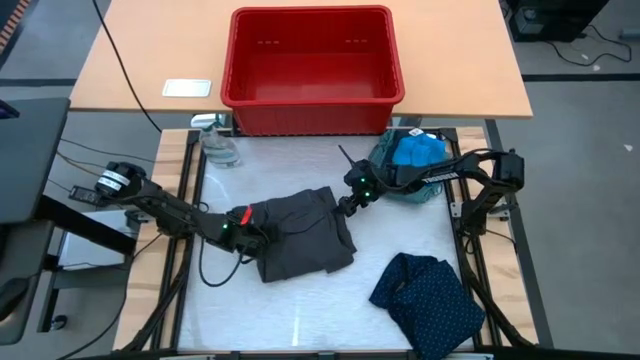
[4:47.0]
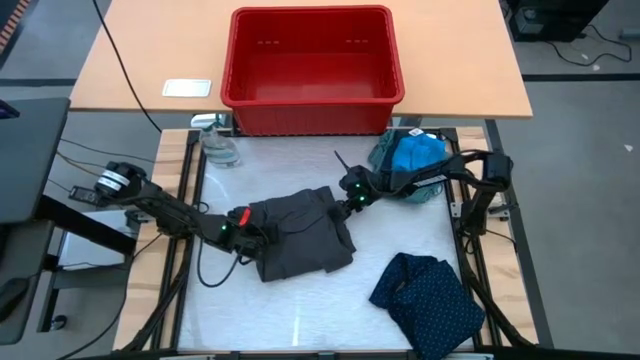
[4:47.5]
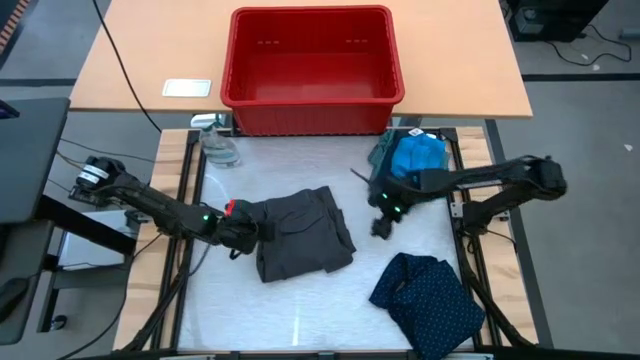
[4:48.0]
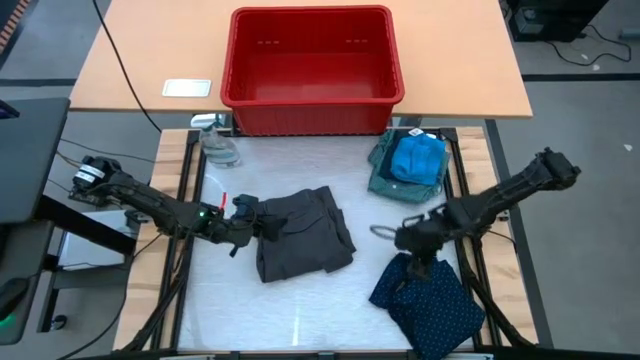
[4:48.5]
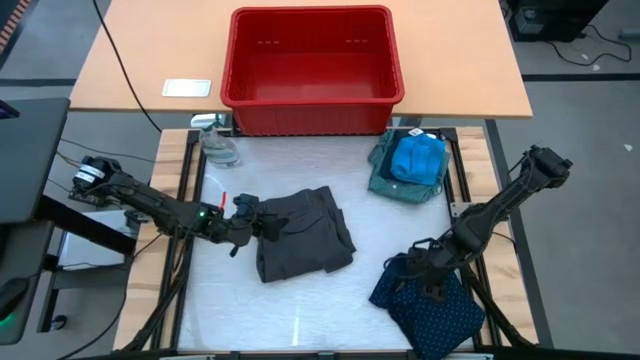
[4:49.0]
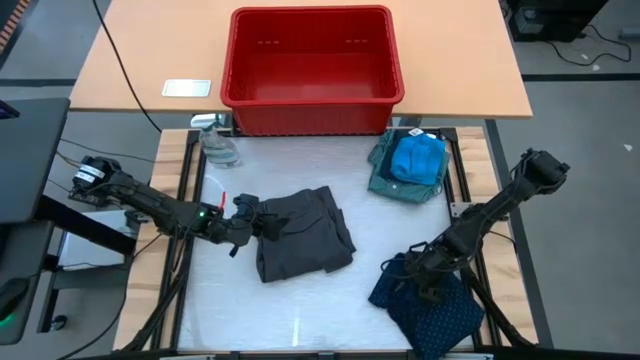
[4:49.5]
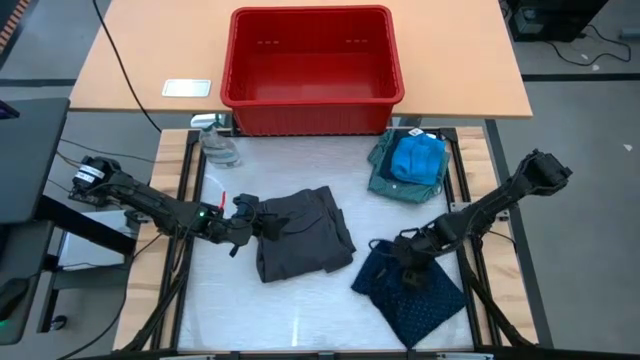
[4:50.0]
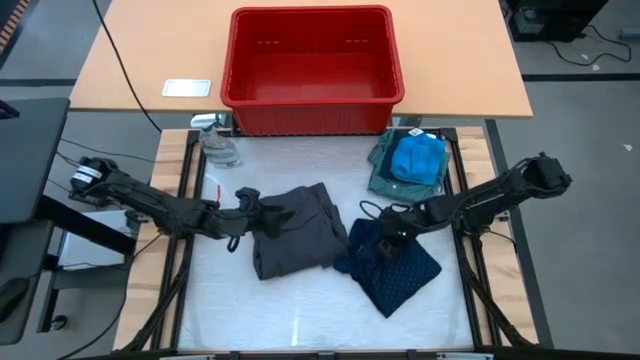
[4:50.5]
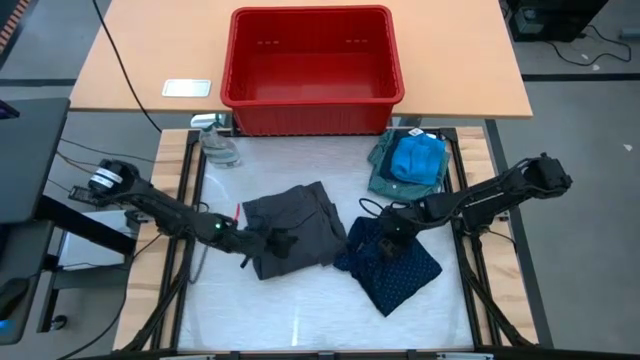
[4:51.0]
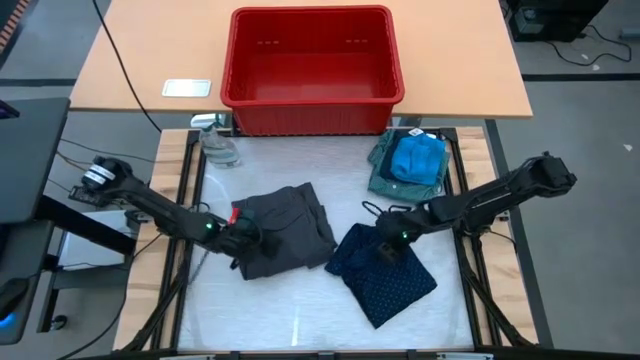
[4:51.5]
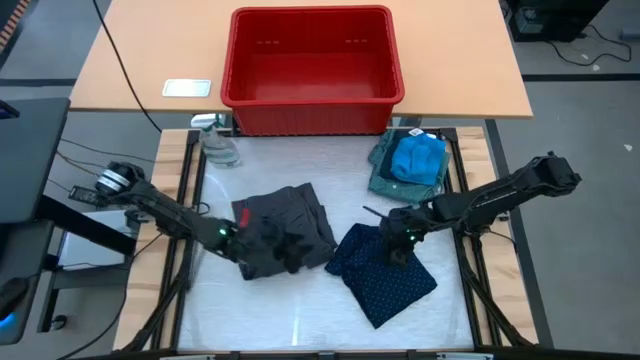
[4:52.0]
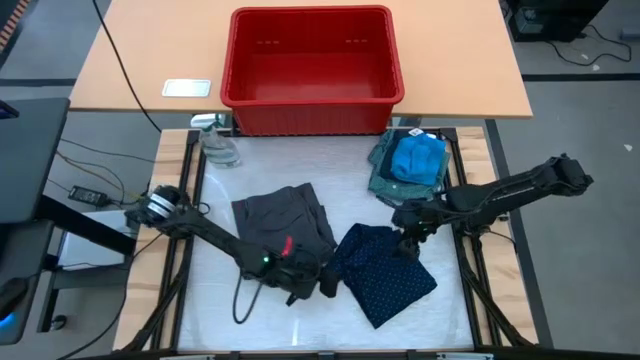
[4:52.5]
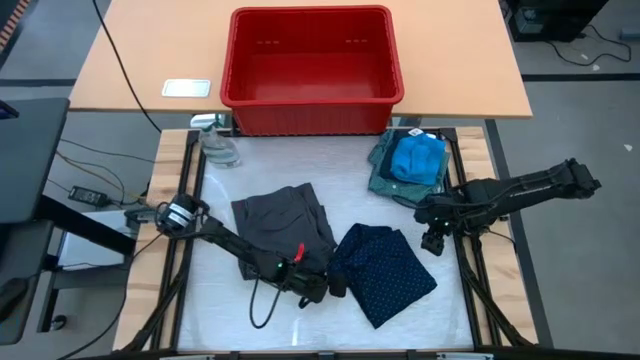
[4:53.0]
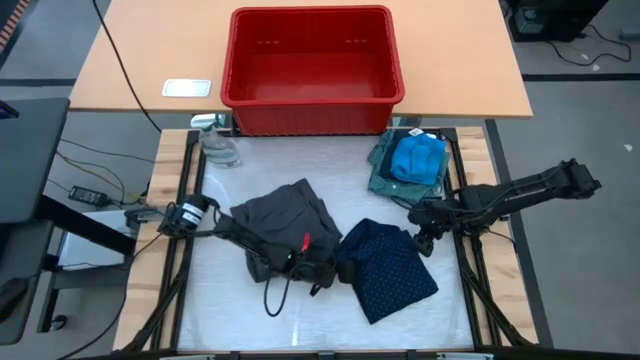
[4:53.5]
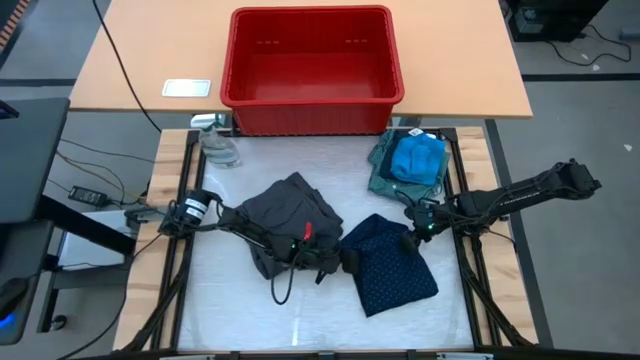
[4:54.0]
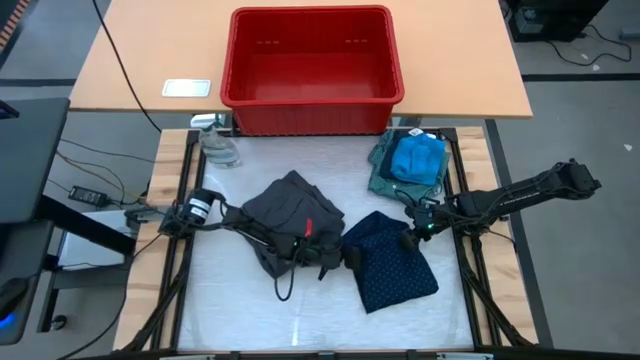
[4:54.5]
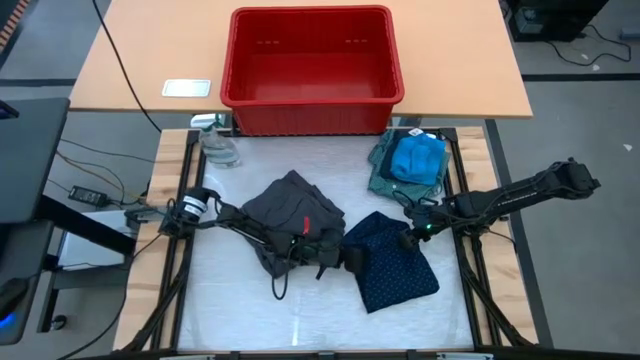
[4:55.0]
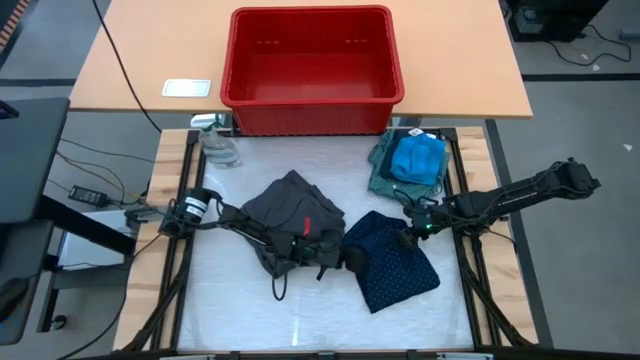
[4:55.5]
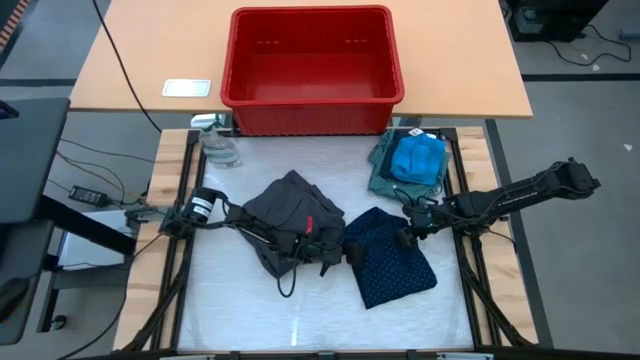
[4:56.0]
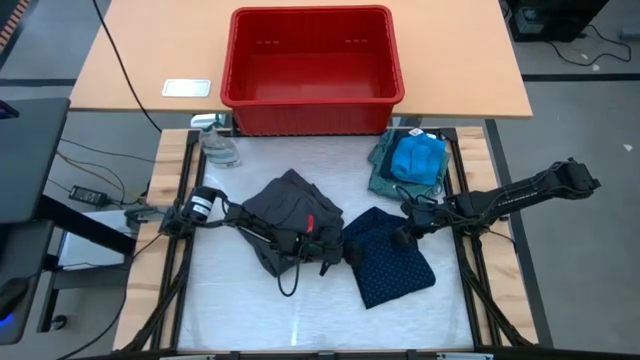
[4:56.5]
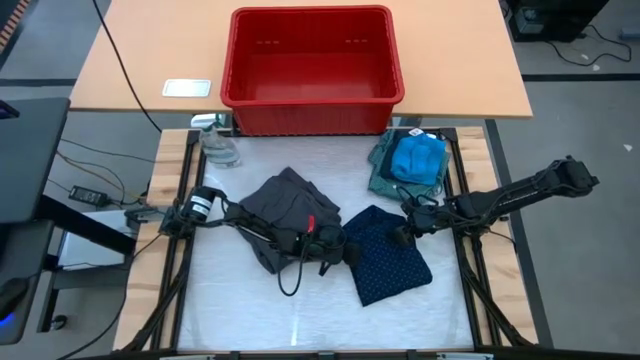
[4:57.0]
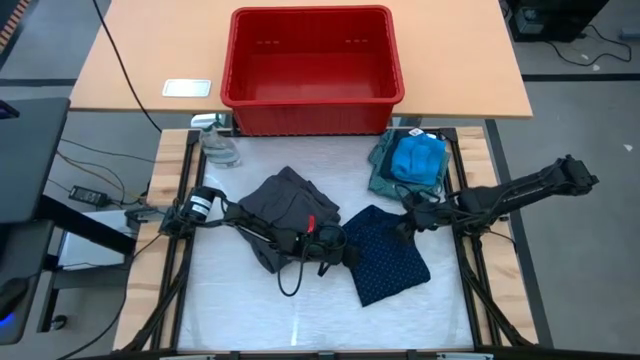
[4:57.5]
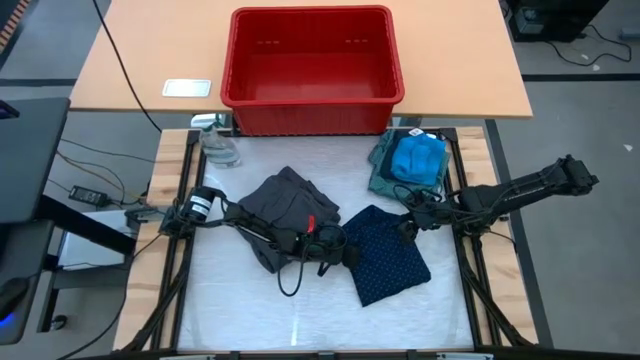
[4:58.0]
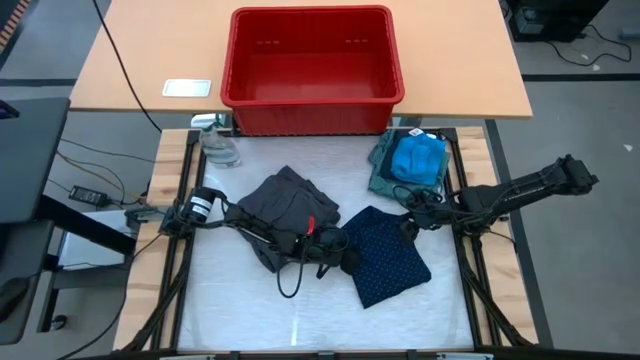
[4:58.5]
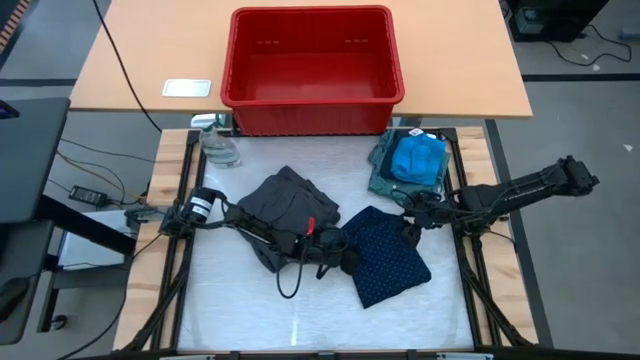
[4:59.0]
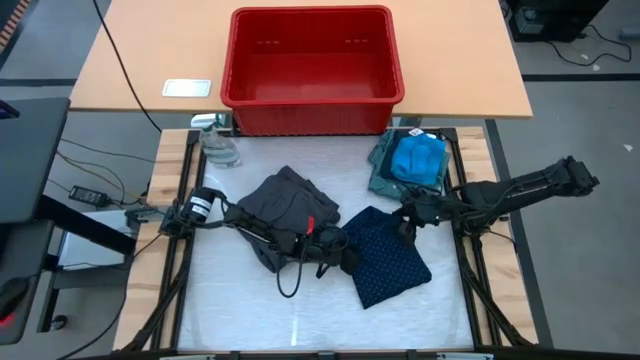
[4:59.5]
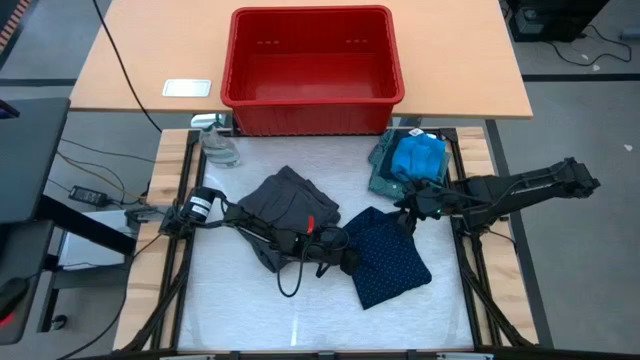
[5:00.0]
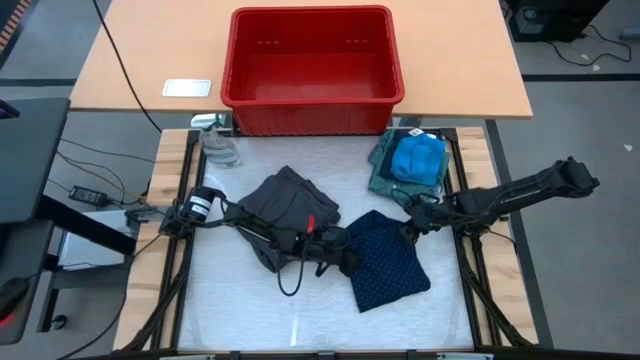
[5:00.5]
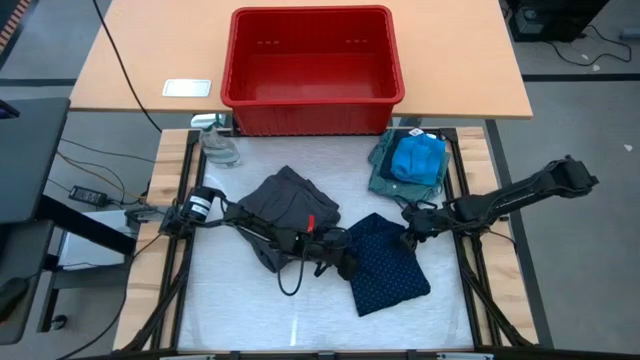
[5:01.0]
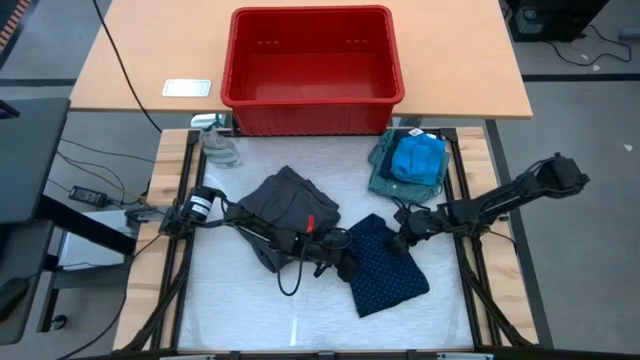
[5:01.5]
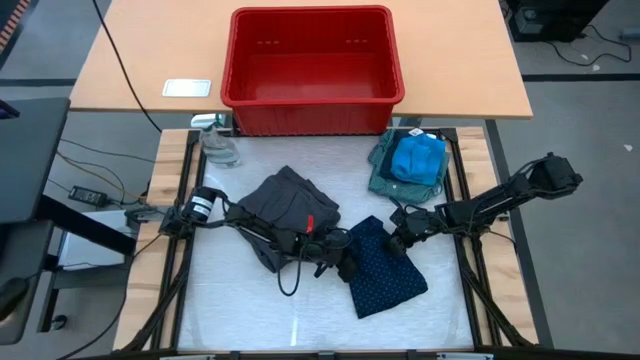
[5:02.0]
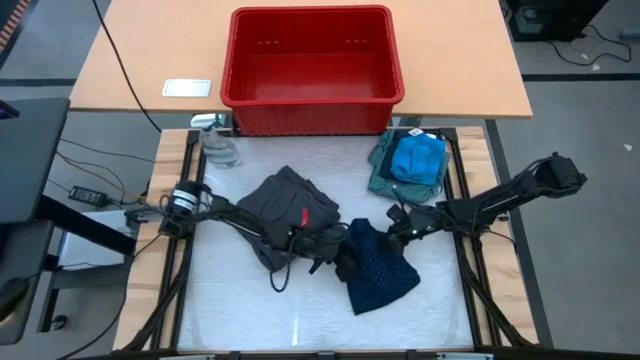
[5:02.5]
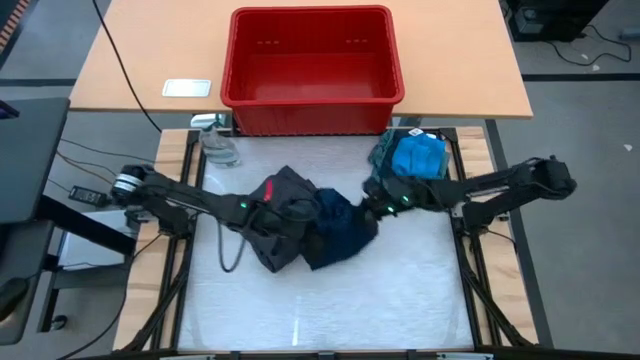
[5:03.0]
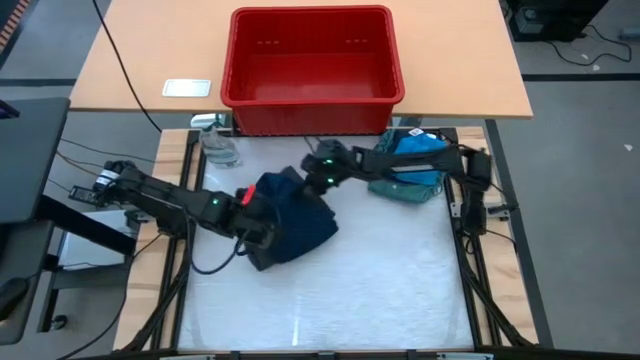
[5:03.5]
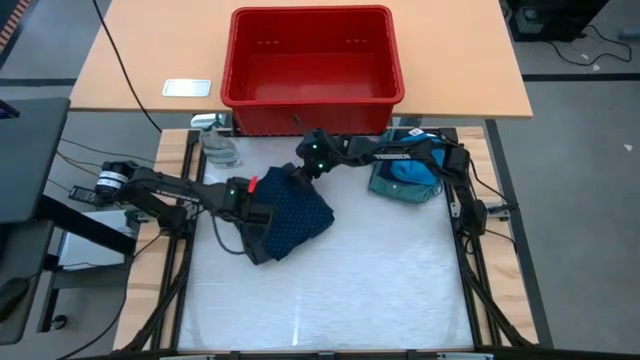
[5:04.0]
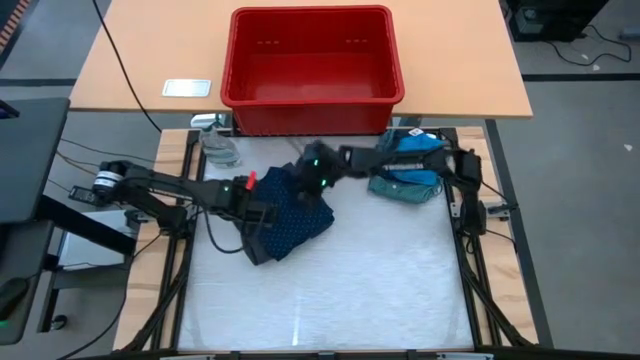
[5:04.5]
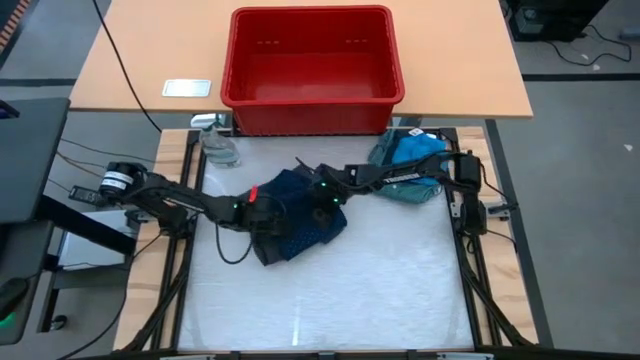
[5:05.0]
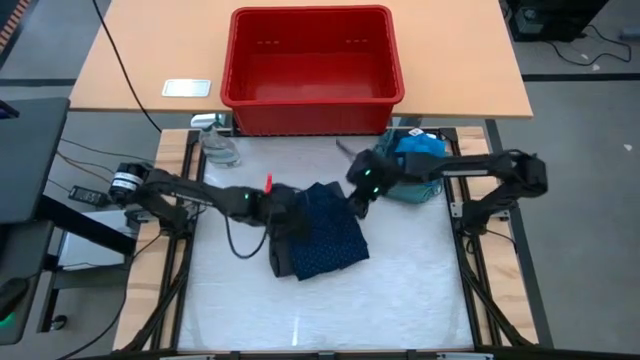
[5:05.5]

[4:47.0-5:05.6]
Task: Fold laundry
Stack the dark blue polo shirt on top of the gray shorts

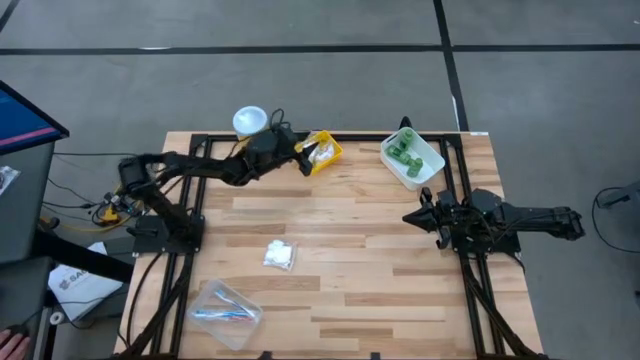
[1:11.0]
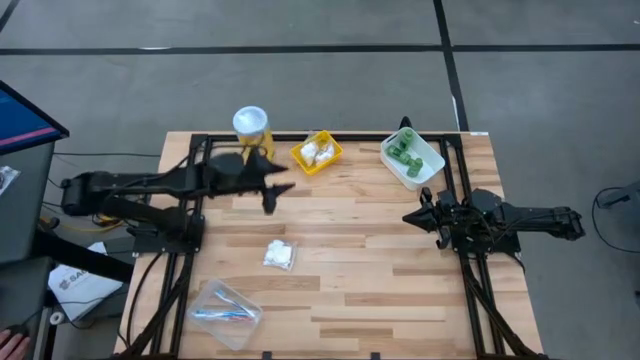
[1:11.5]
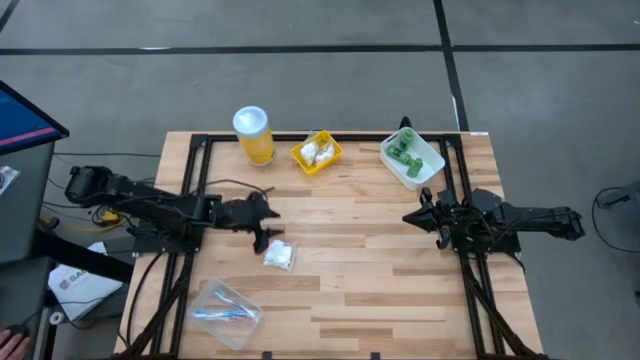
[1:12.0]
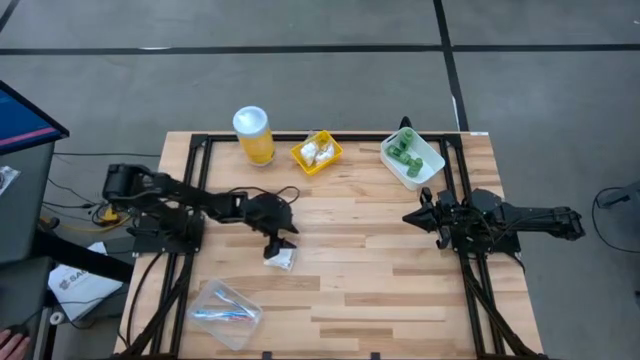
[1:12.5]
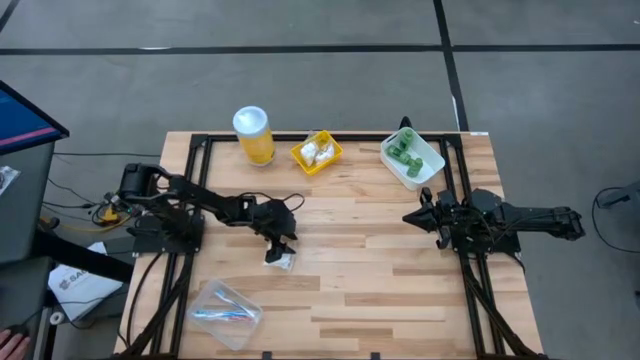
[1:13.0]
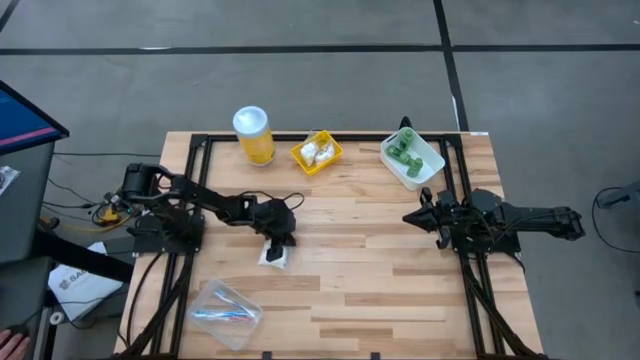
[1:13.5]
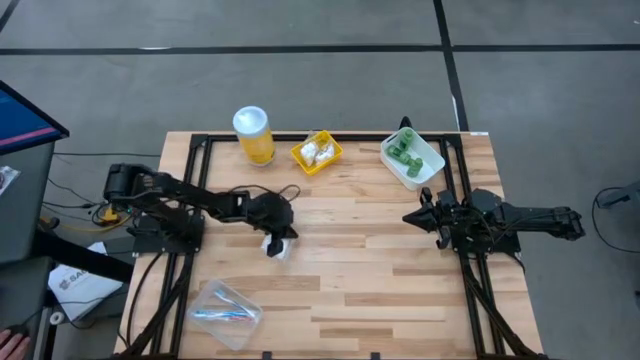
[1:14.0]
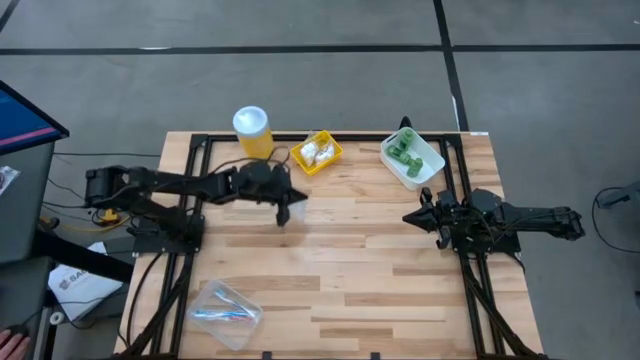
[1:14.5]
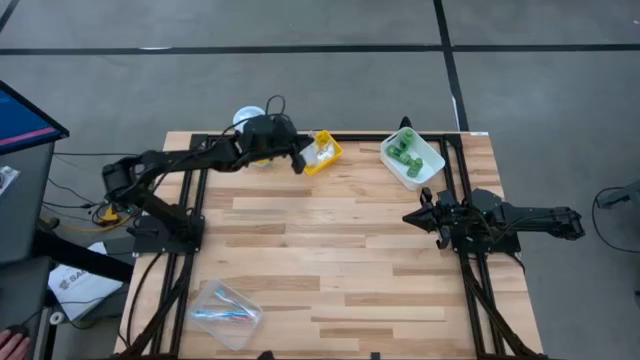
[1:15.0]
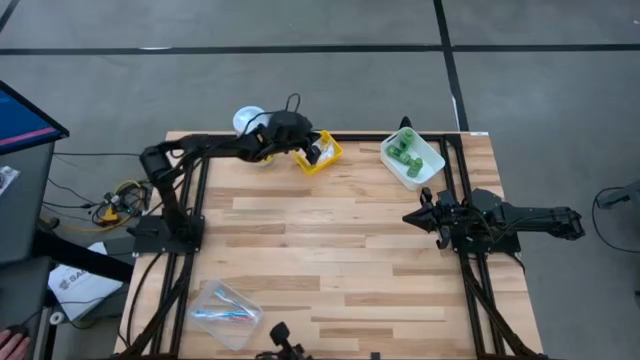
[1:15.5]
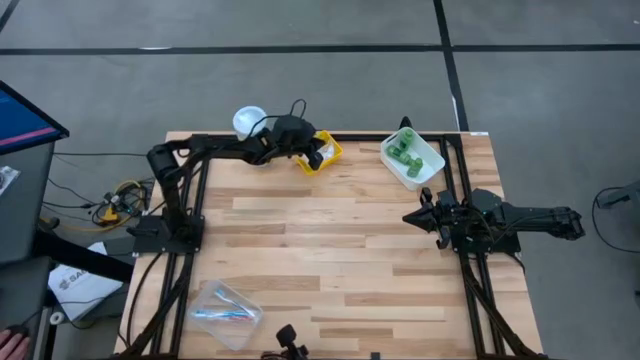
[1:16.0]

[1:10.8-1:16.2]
Task: Pick & Place Travel size toiletries
Put the cotton pack into the yellow bin
